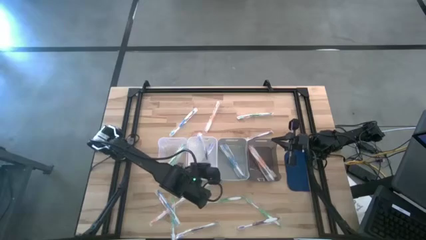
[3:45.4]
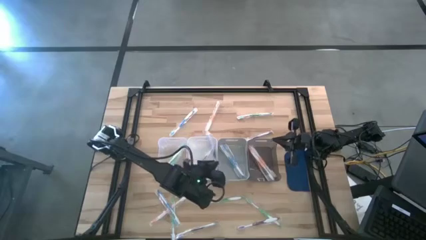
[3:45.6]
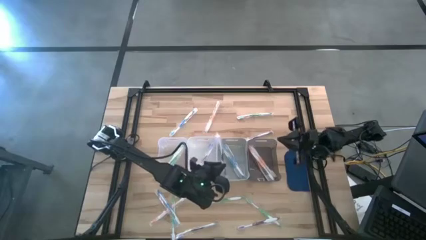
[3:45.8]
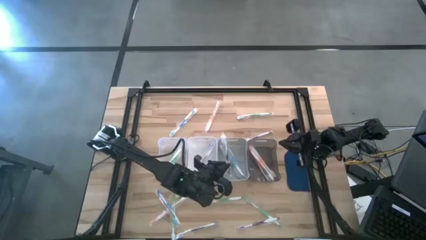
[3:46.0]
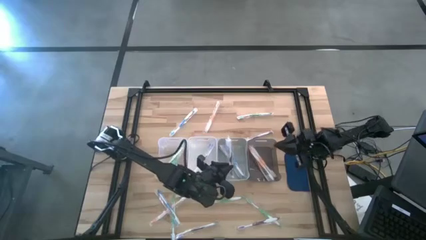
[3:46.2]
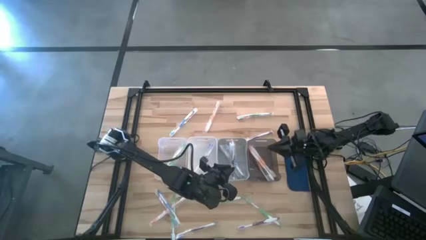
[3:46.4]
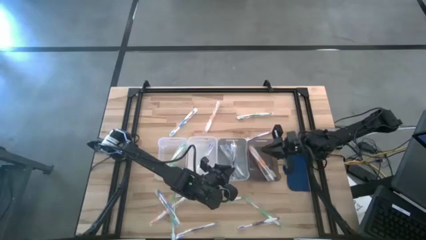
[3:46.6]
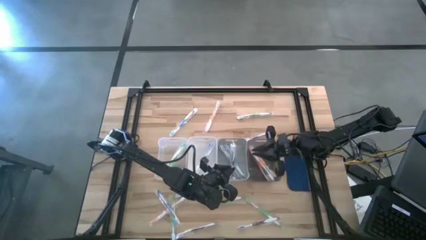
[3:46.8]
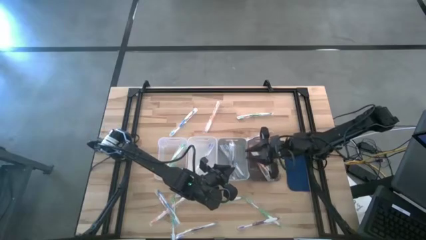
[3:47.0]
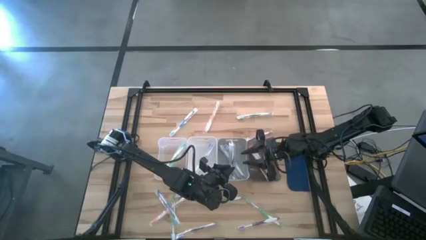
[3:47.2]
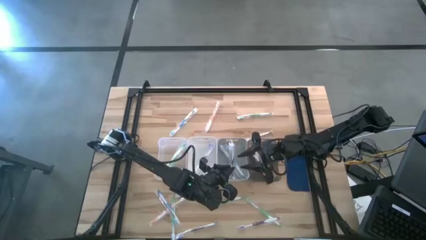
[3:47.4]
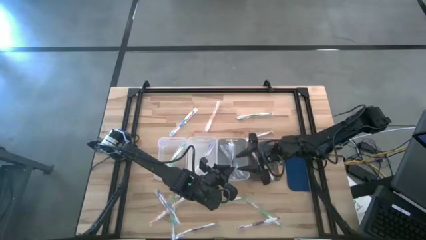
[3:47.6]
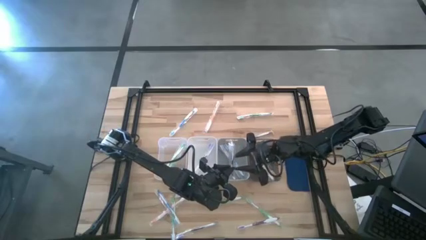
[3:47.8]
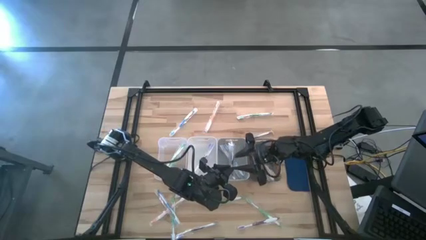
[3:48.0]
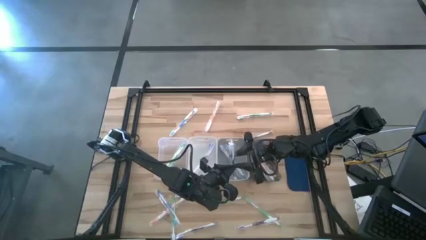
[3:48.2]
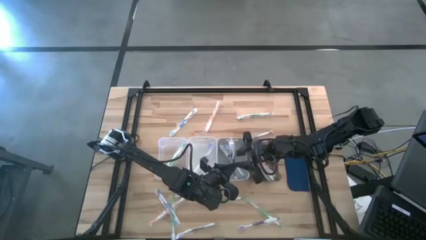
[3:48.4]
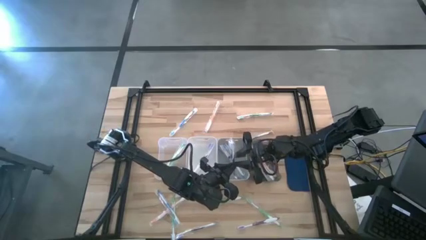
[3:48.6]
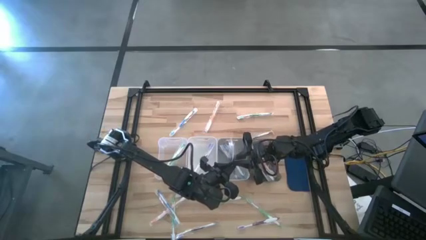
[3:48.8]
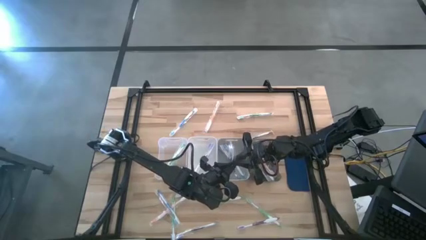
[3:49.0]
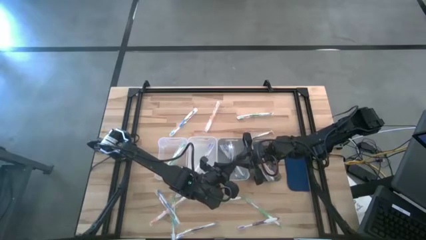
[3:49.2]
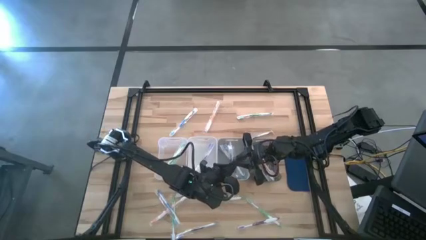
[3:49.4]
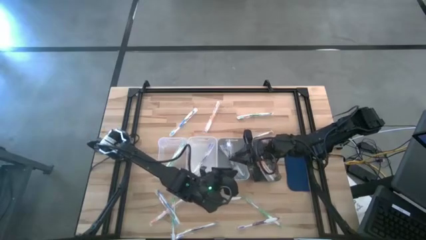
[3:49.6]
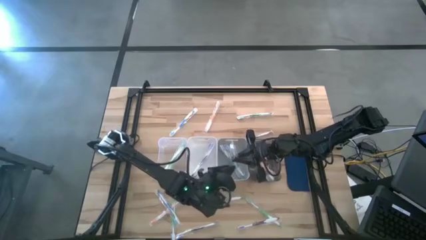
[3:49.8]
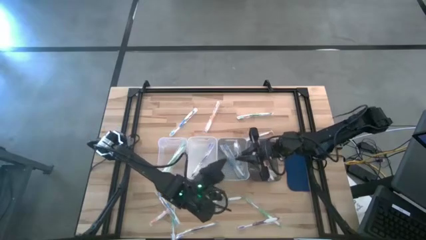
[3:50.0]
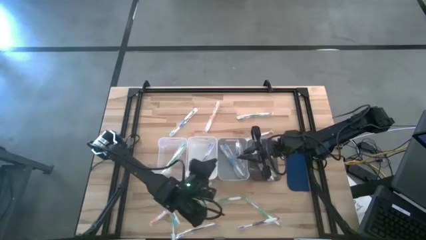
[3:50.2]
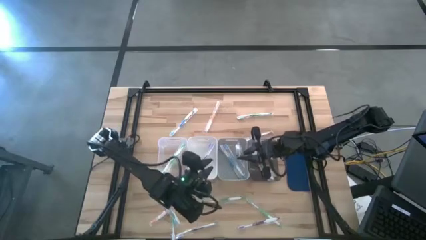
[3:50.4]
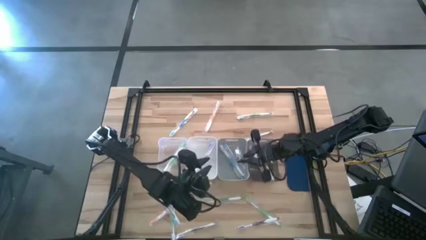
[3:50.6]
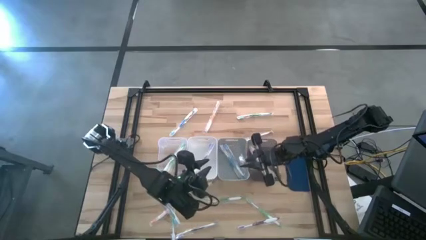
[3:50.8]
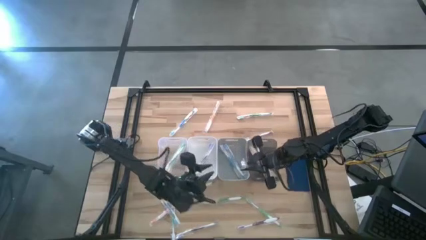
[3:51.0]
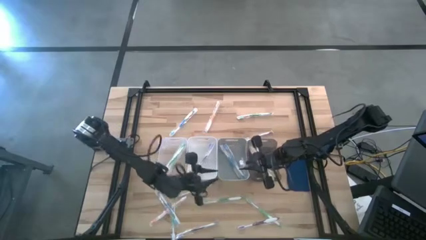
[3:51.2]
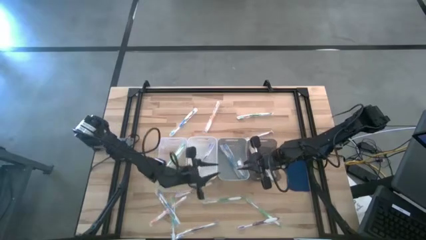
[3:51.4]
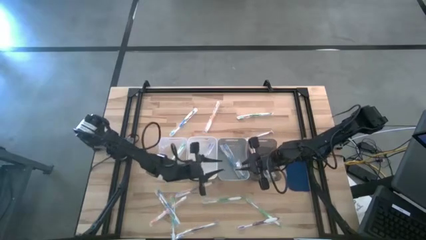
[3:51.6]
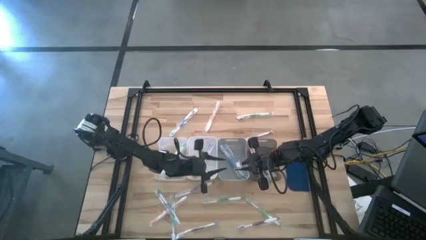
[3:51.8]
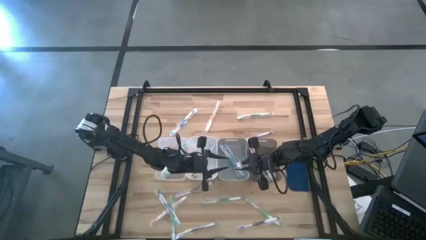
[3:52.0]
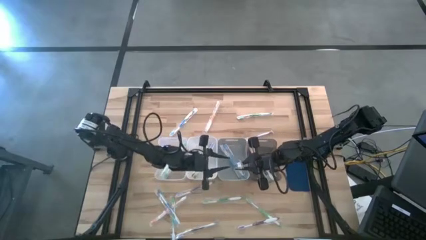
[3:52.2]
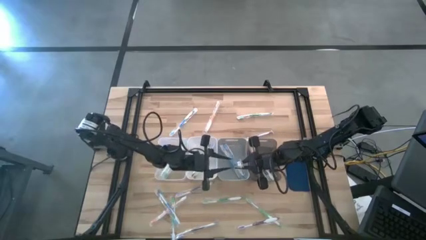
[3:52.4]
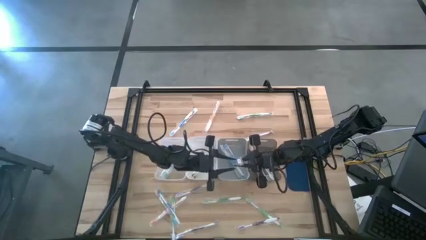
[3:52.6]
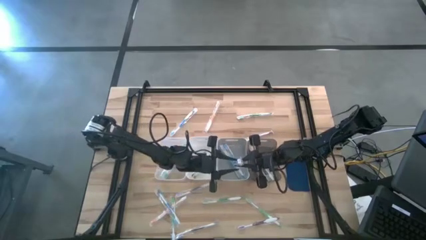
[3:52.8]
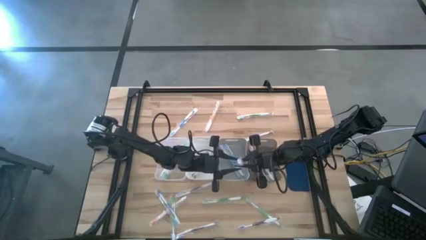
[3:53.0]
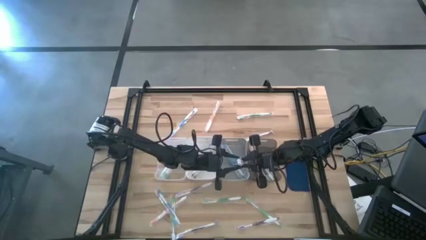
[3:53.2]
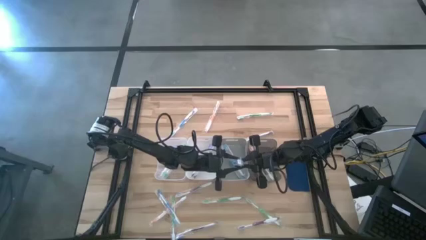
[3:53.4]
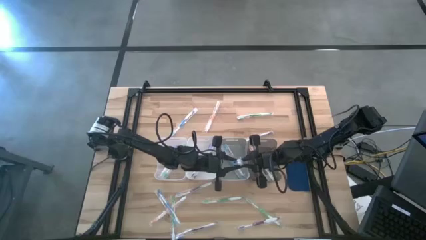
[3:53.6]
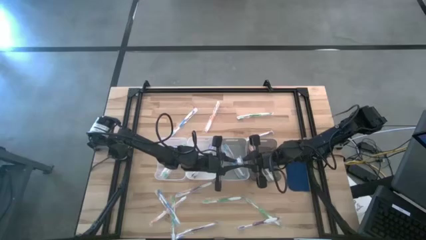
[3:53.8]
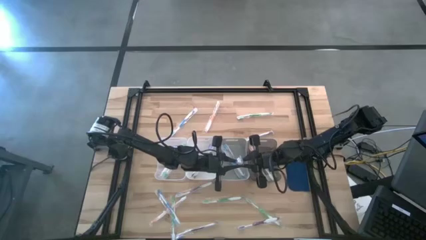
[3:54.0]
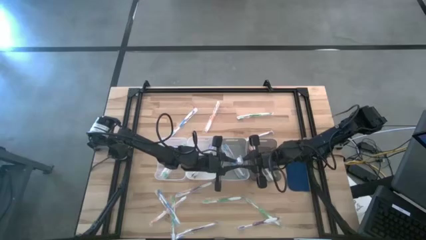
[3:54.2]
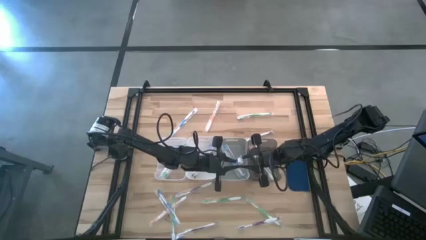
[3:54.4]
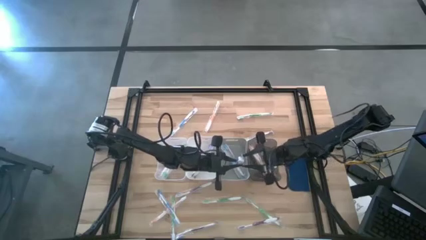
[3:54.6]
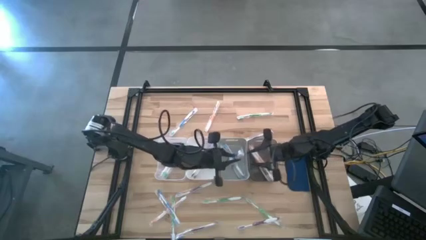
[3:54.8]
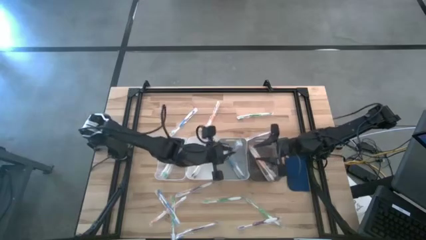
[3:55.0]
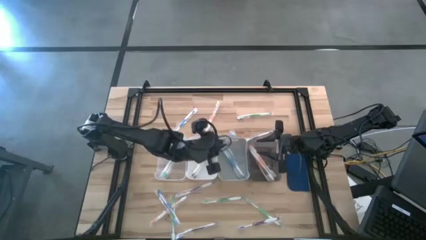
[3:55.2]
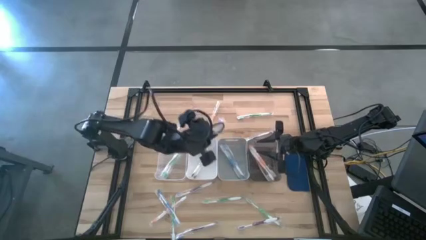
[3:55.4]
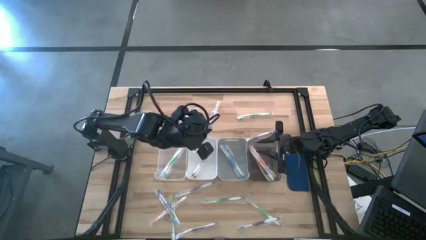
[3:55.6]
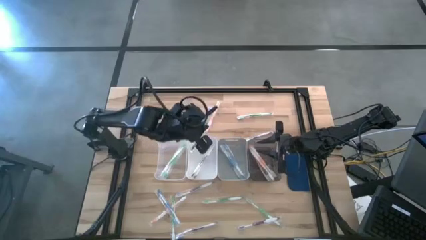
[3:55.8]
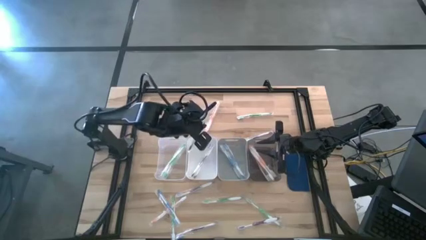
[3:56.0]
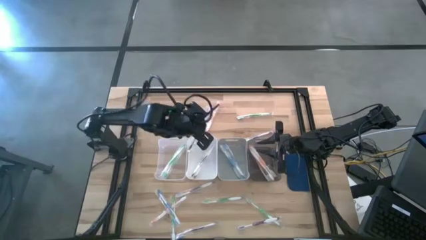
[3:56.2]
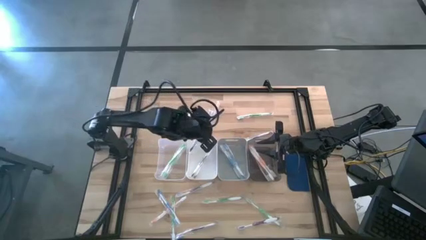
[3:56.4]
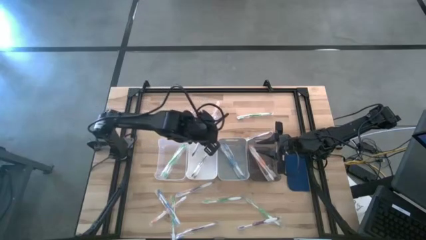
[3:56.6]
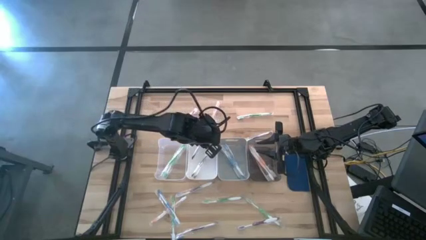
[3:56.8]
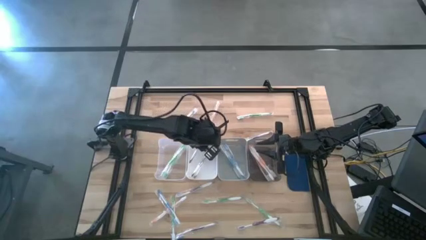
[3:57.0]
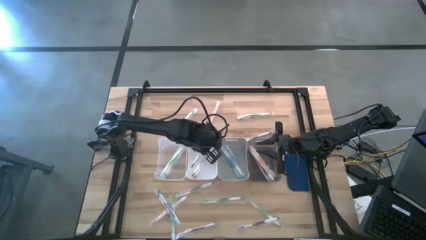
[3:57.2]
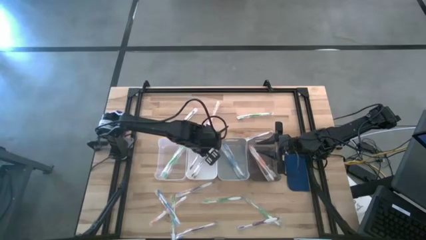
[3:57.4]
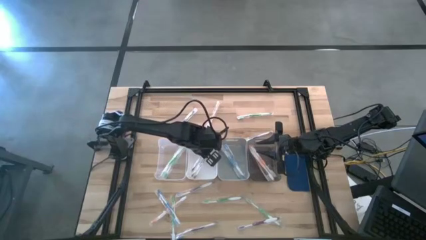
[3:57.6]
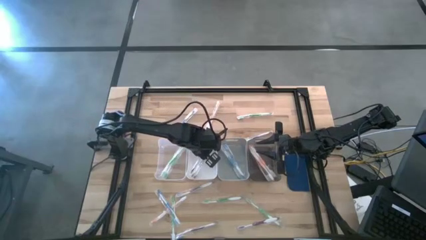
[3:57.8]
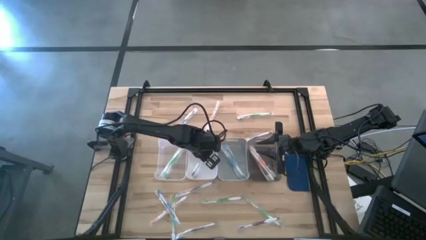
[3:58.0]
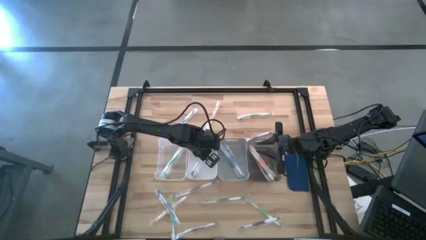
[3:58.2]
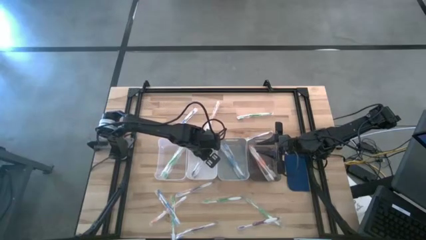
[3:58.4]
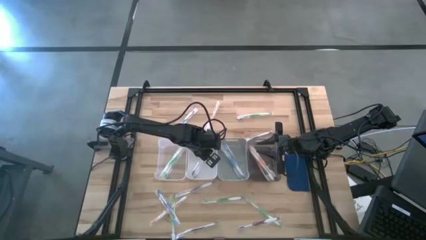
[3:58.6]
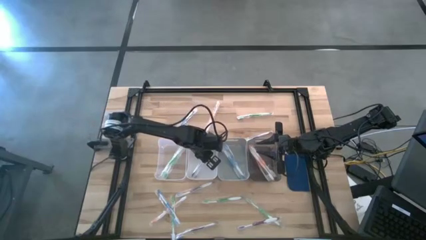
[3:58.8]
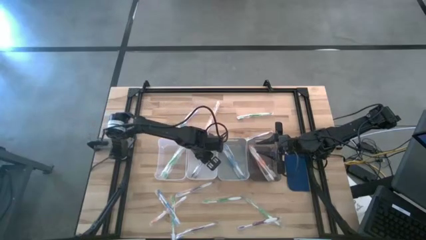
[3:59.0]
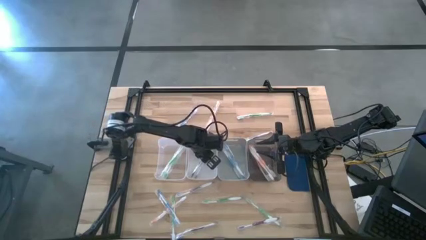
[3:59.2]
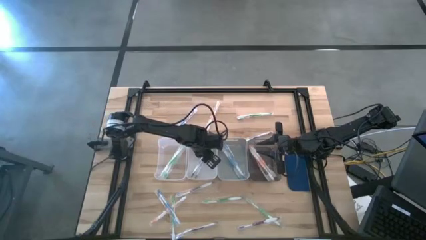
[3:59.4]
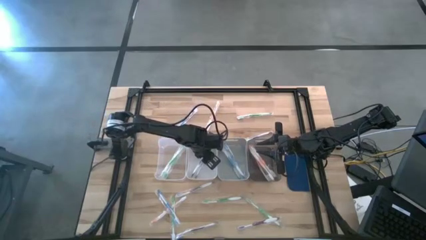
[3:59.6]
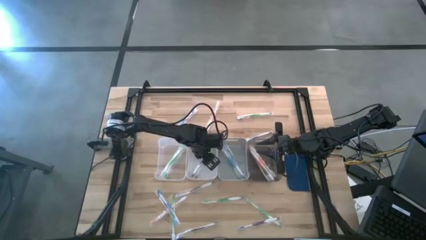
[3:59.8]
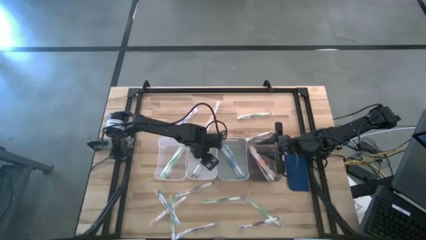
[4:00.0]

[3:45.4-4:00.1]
Task: Pick & Place Toothbrushes
Put the purple toothbrush into the white bin

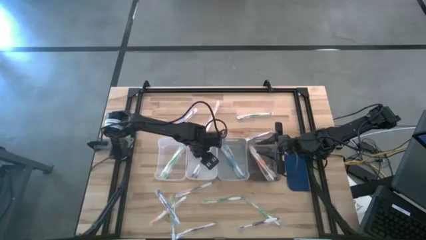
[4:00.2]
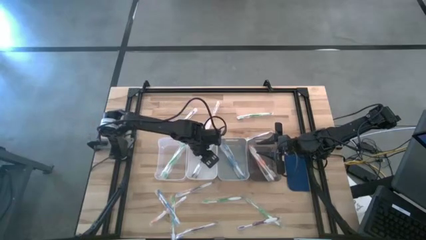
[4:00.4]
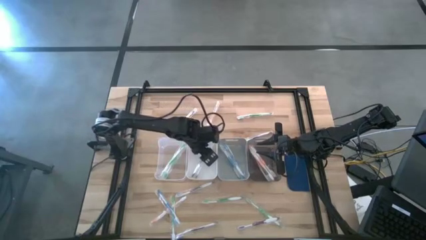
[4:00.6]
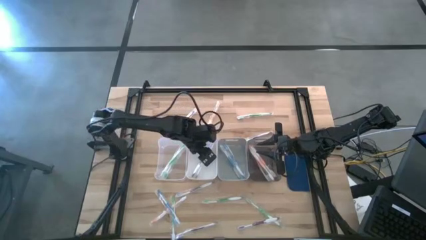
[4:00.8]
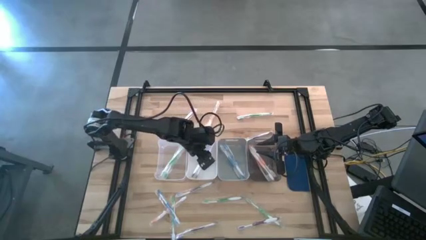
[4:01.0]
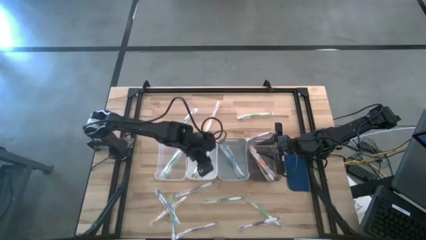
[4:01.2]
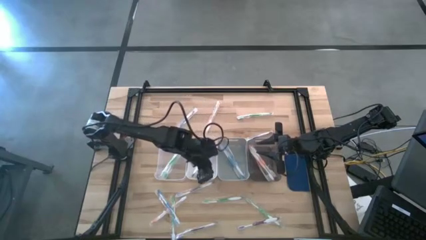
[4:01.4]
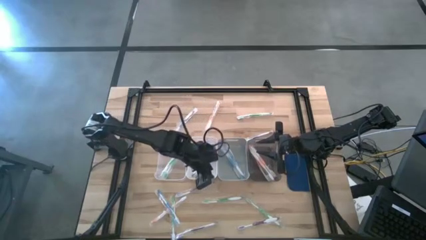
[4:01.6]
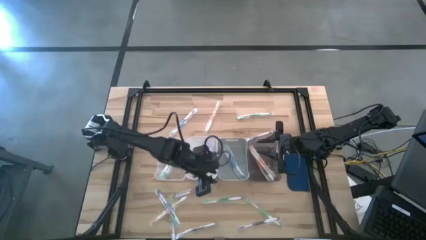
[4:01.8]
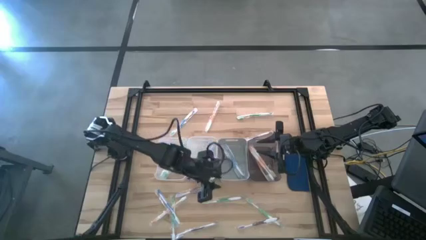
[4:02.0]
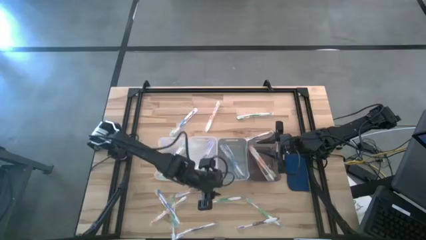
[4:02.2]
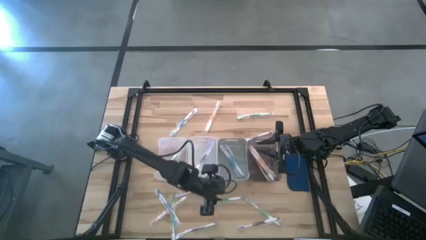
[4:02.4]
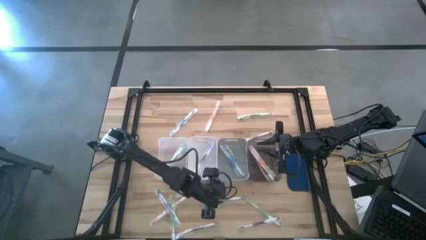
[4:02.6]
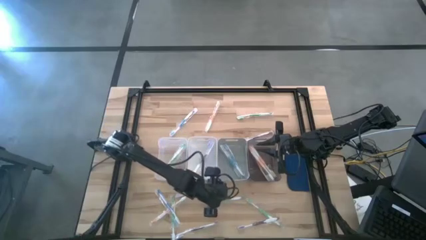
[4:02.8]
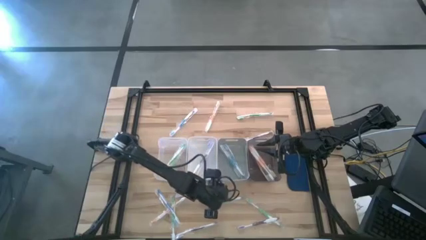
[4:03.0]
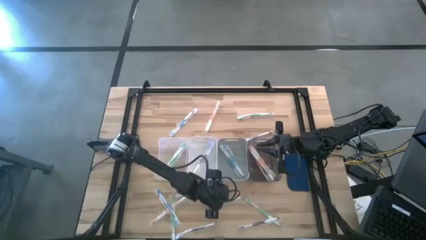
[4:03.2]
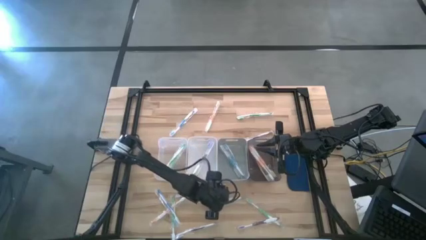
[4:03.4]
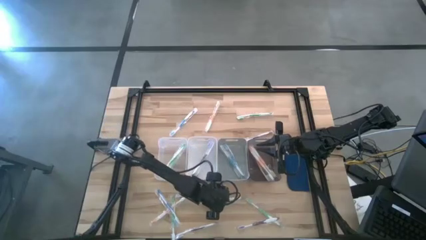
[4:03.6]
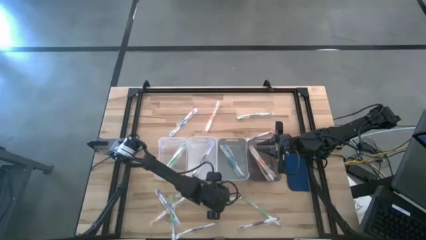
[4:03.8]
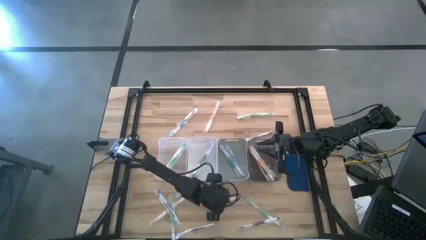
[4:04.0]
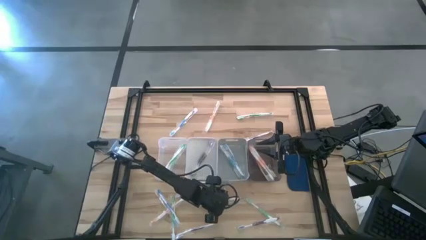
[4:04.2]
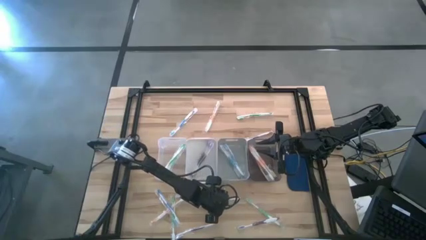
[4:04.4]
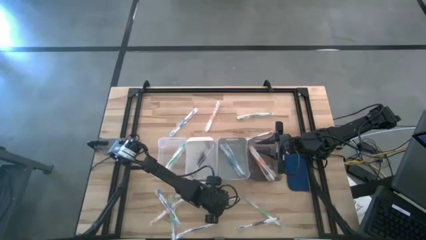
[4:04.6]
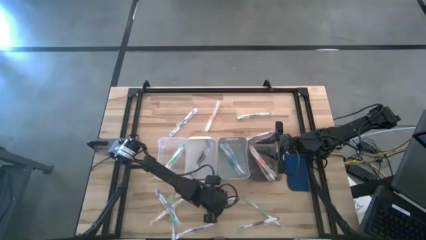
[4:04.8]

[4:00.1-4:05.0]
Put the green toothbrush into the transparent bin
